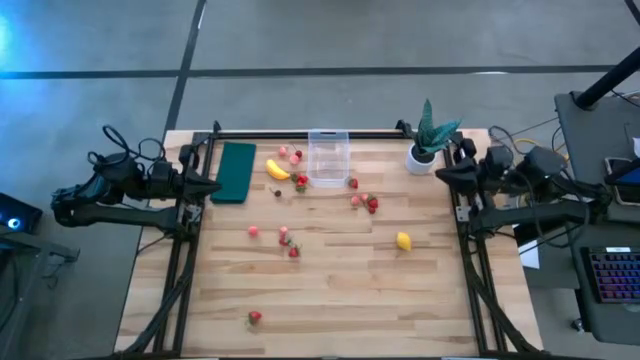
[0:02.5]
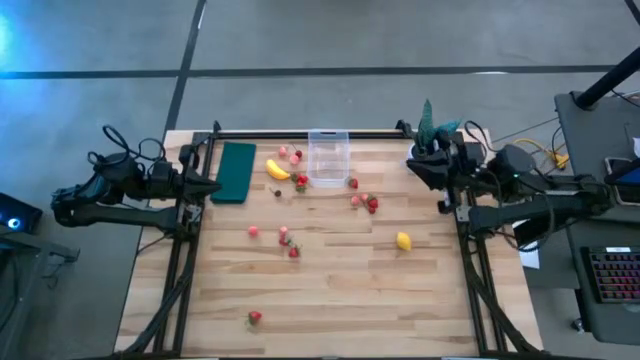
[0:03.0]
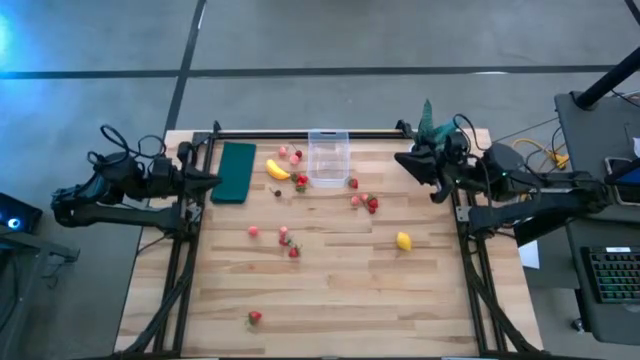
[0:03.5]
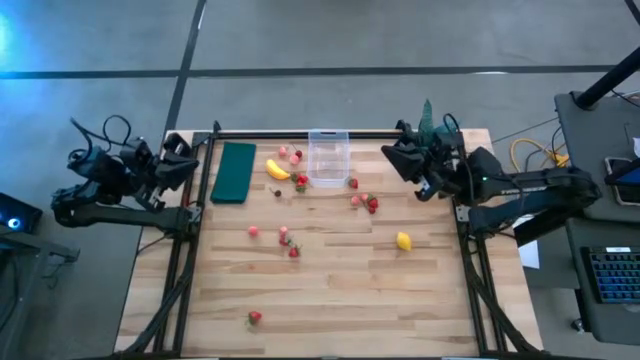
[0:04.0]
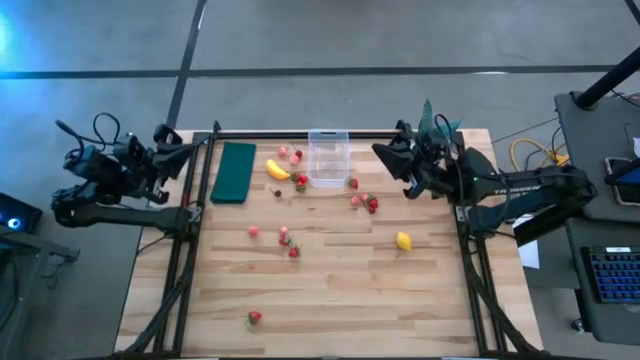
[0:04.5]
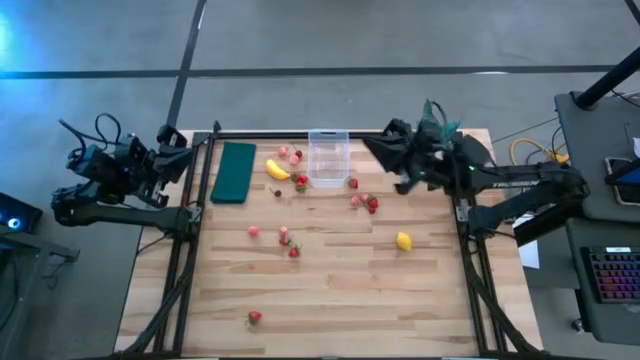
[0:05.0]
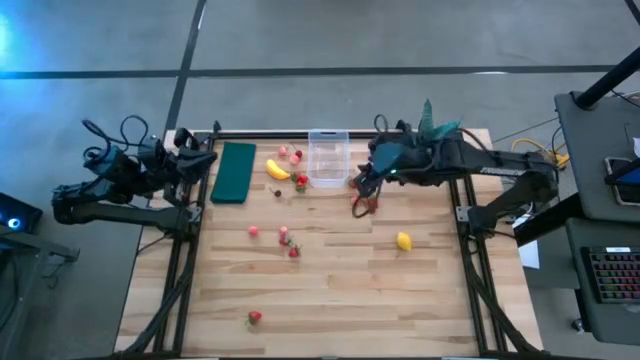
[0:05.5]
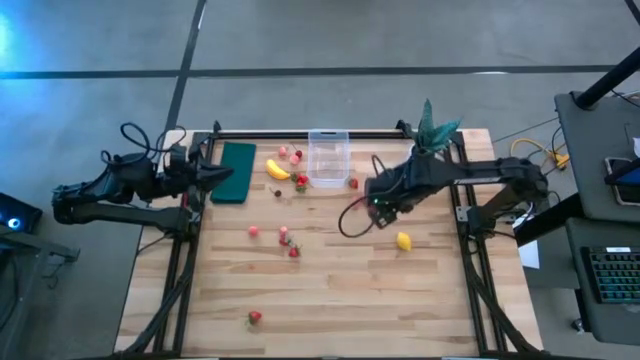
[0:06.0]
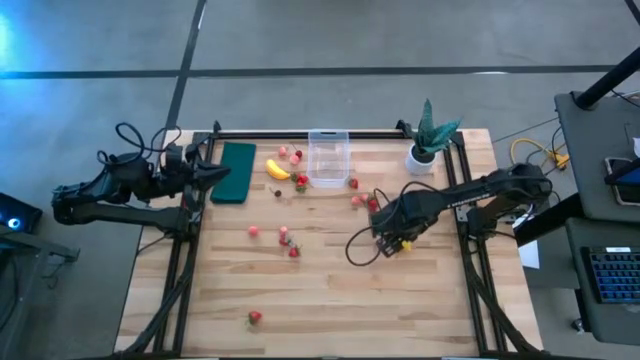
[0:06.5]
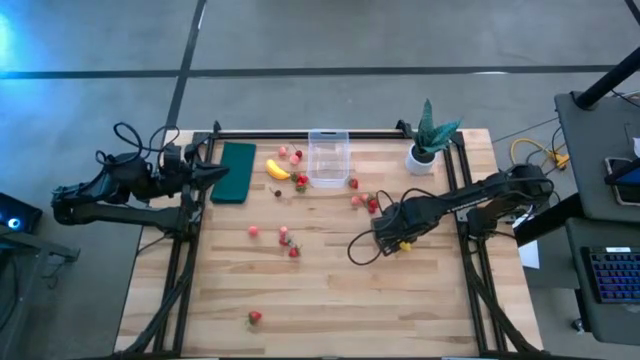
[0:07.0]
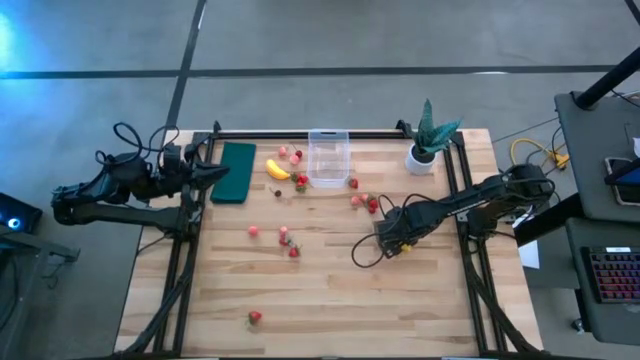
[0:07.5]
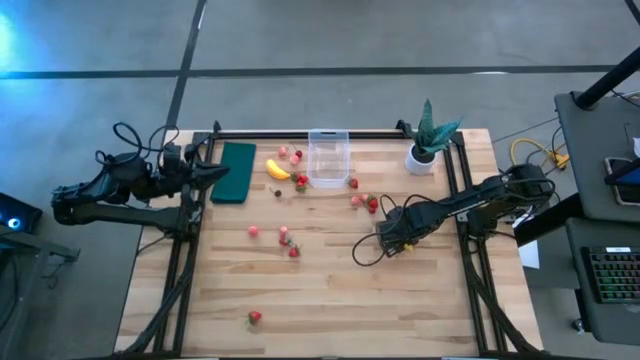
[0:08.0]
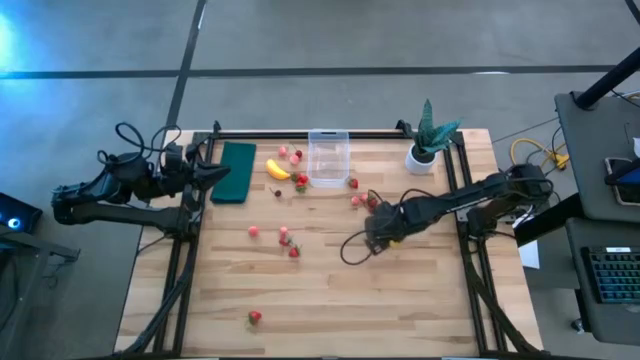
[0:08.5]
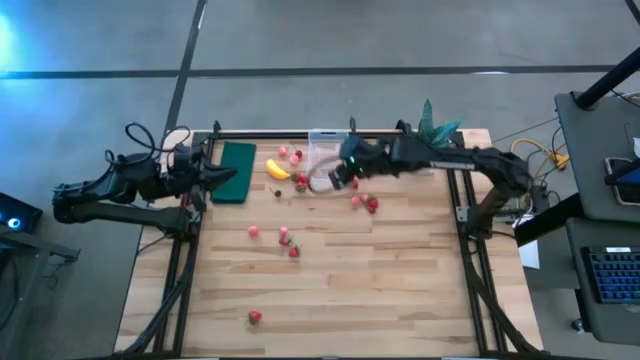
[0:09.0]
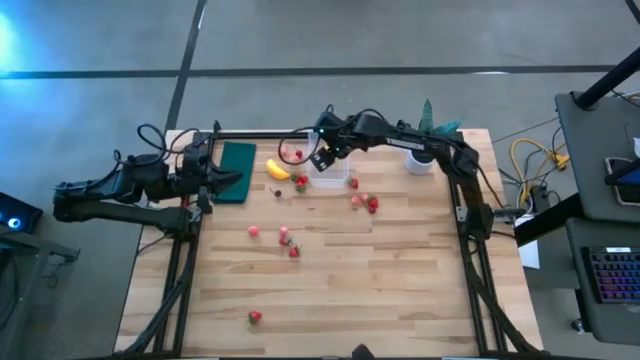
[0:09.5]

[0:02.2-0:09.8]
Task: Pick and placing Produce into tupperware
Put the yellow lemon into the transparent bin

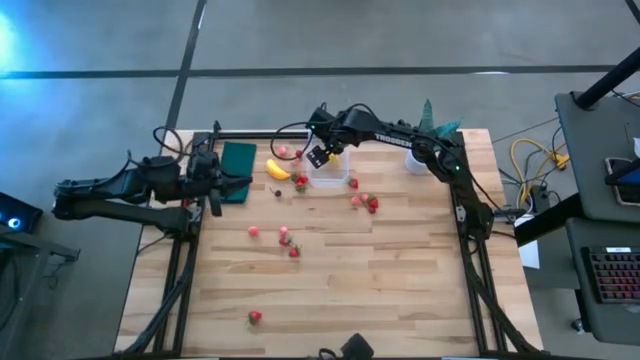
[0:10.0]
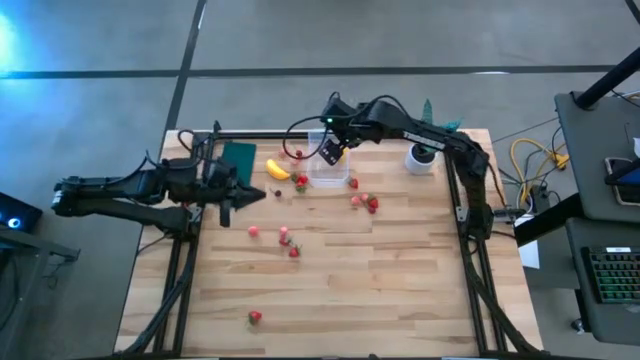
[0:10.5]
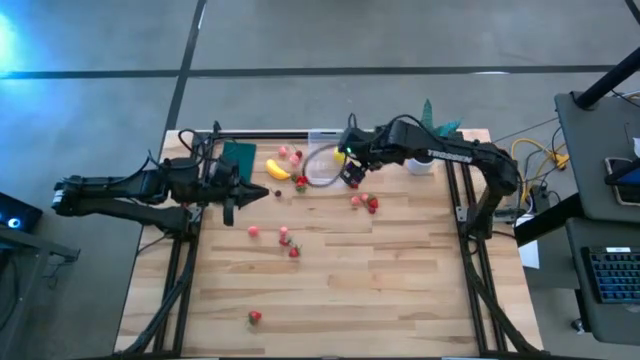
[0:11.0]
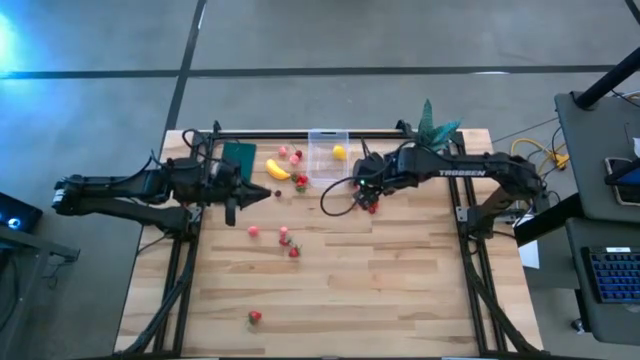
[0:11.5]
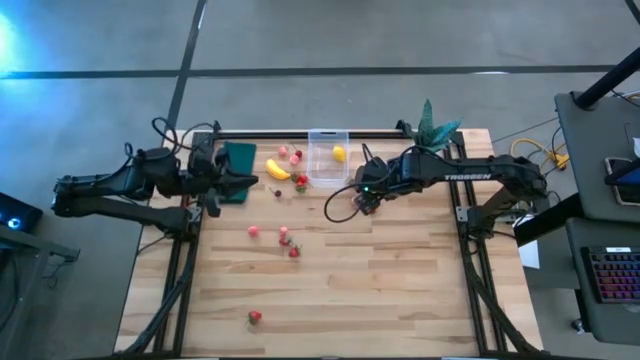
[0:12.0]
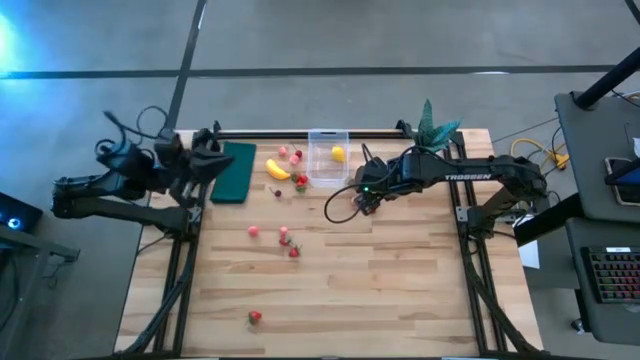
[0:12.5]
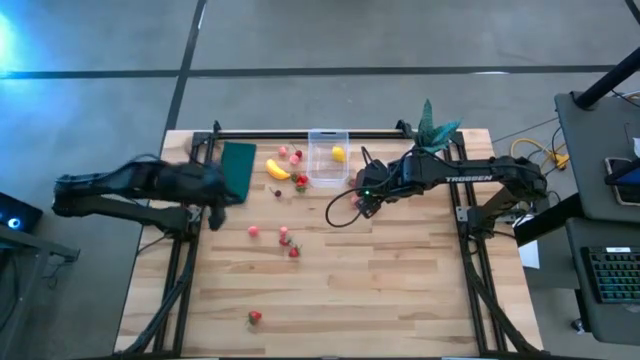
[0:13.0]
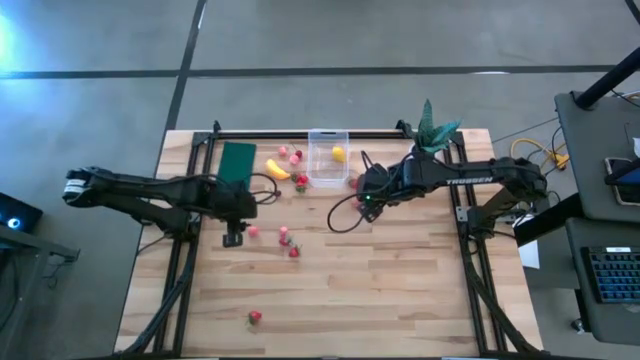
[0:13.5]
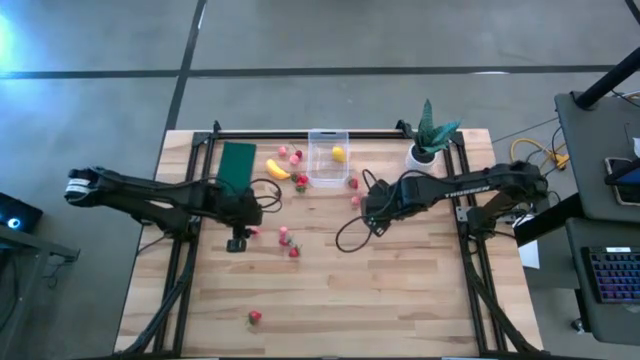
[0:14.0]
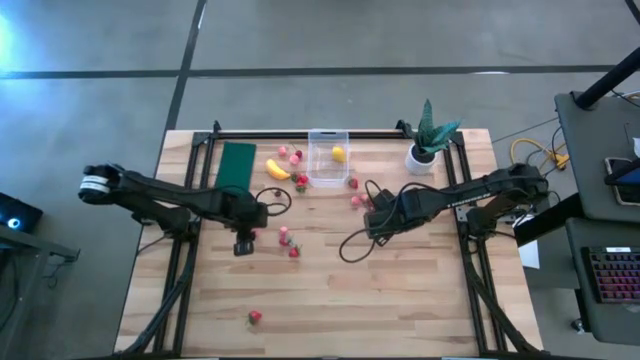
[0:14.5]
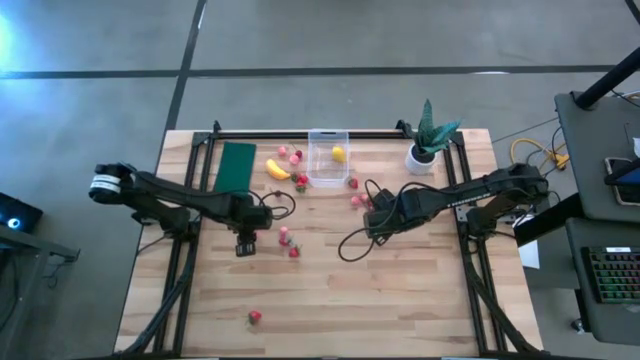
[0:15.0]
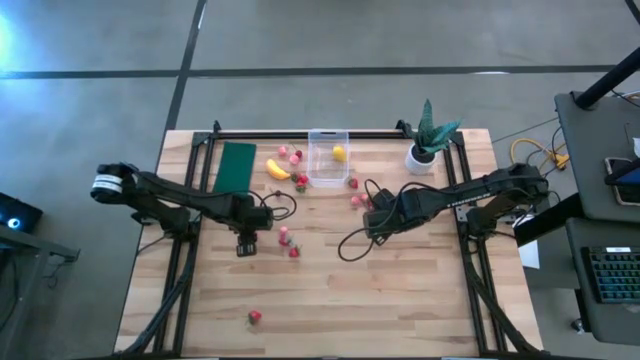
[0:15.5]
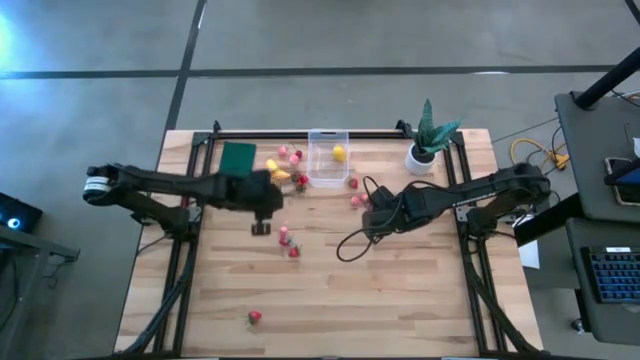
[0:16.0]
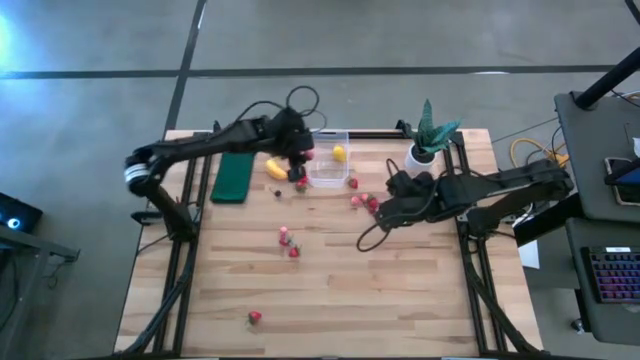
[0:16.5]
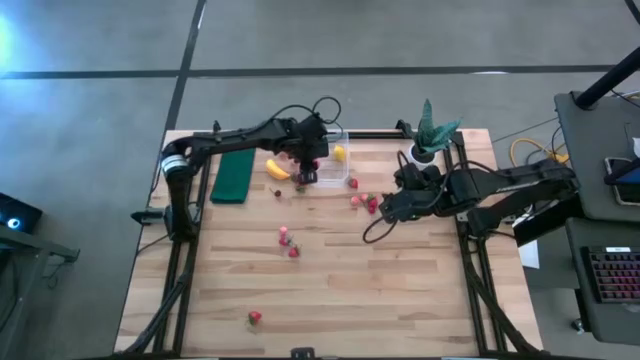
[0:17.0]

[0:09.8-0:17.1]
Put the pink peach into the transparent bin

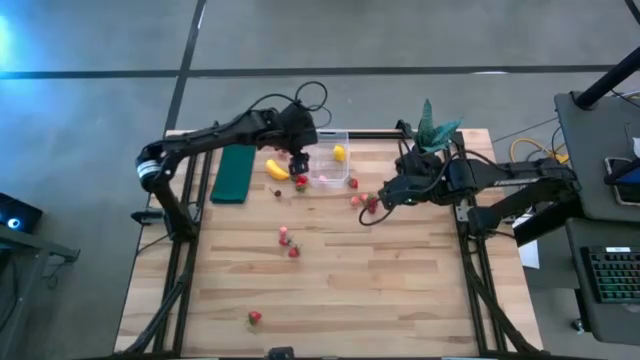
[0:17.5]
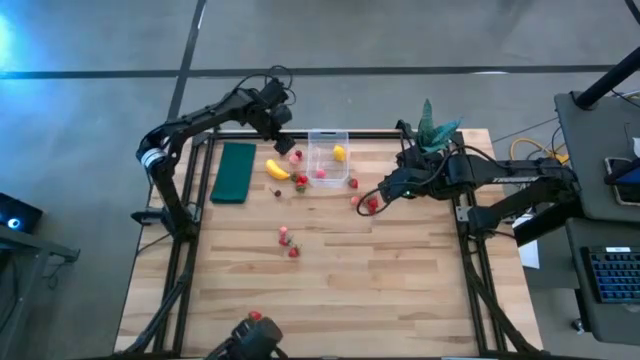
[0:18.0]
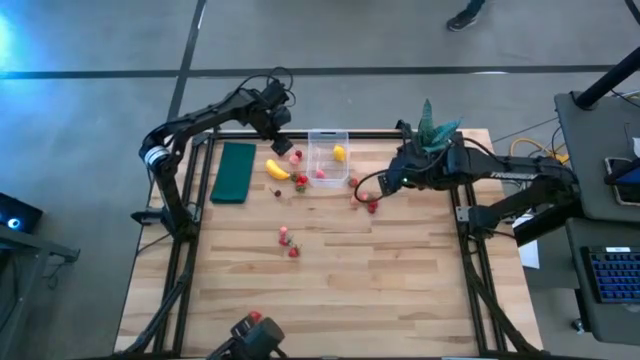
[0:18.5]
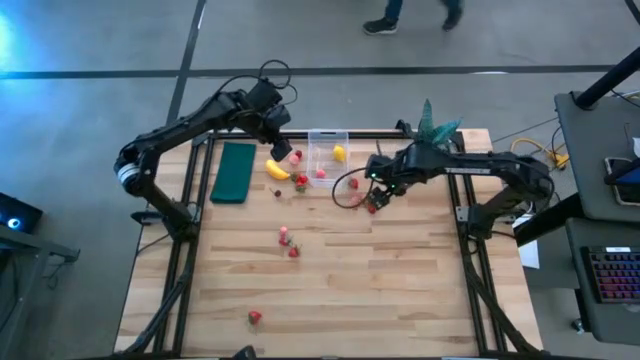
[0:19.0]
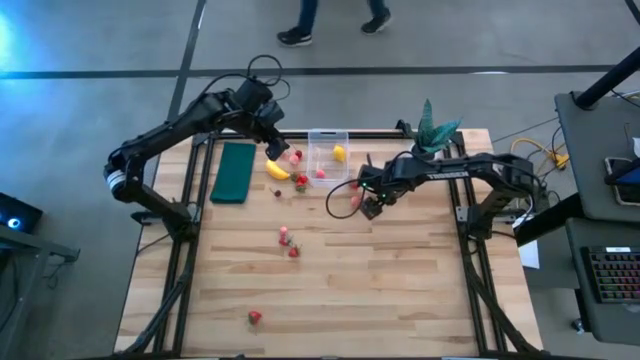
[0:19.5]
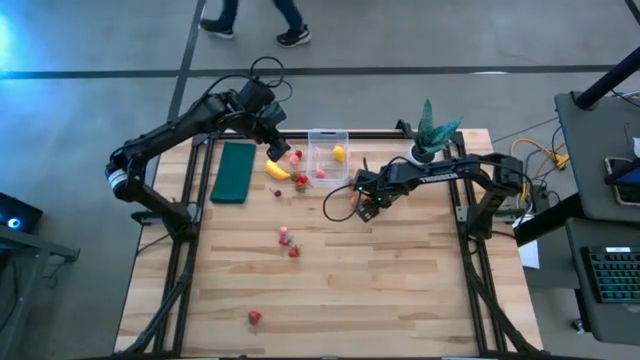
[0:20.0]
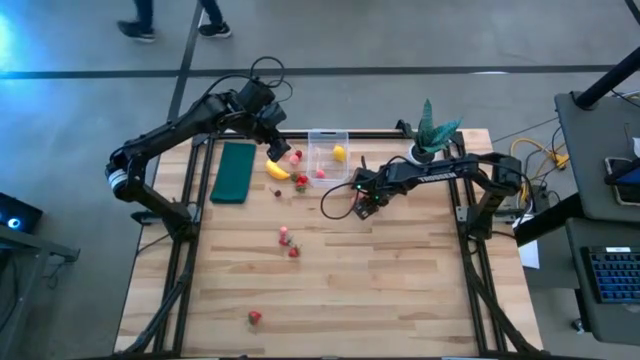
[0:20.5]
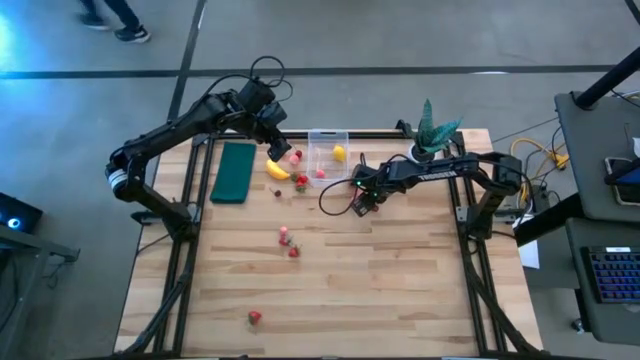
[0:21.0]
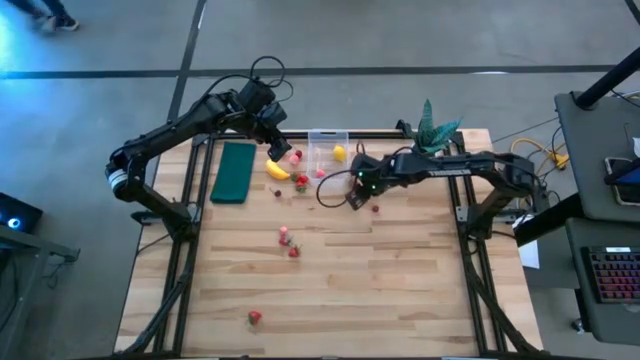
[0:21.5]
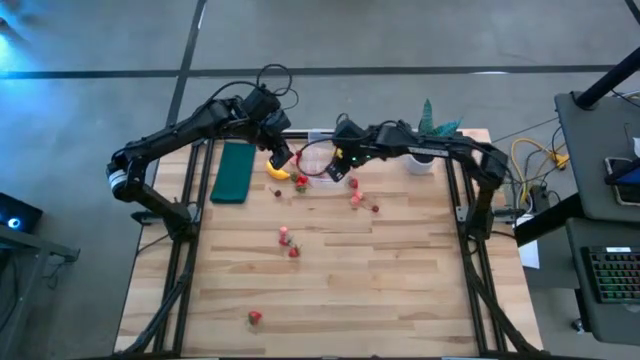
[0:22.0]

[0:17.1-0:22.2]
Put the red strawberry into the transparent bin

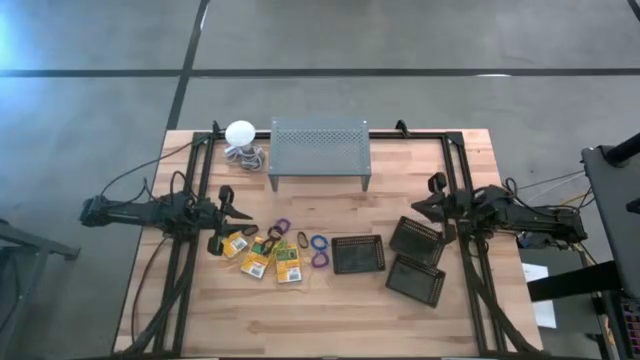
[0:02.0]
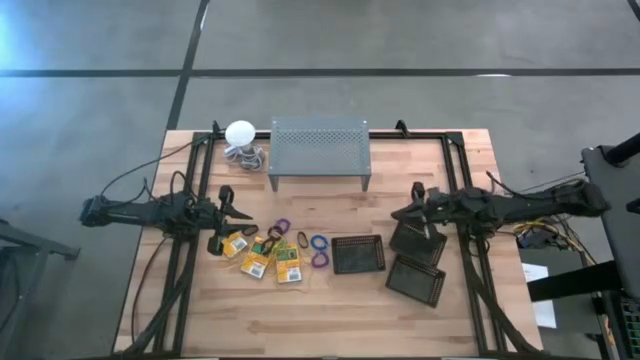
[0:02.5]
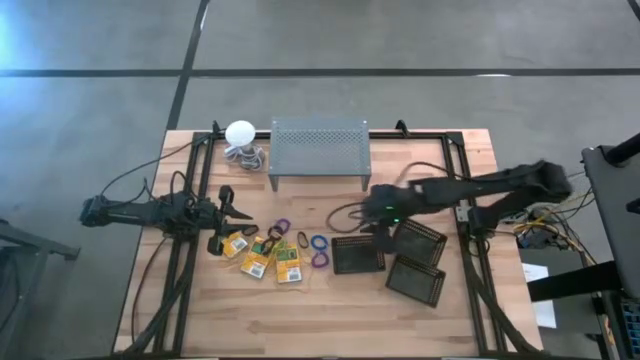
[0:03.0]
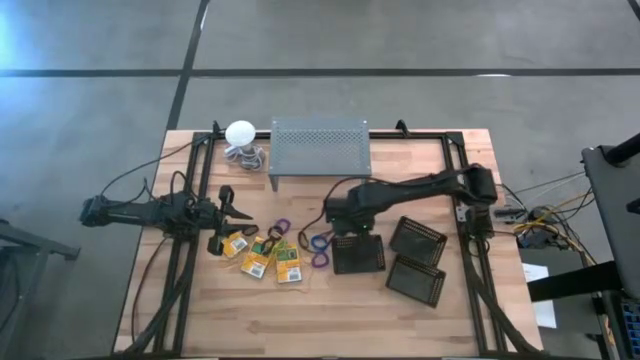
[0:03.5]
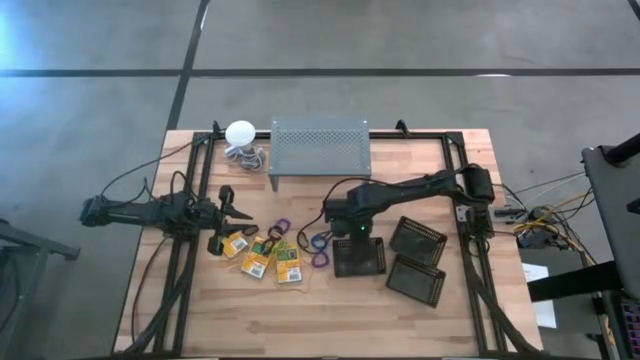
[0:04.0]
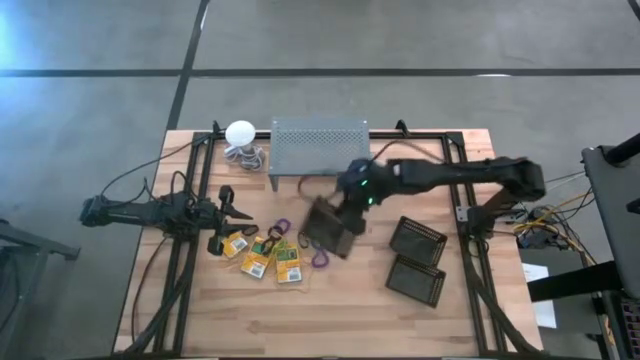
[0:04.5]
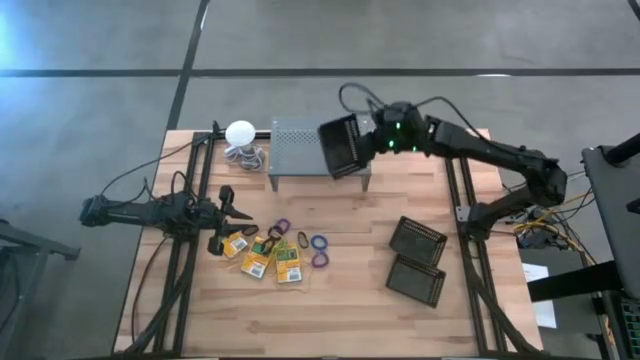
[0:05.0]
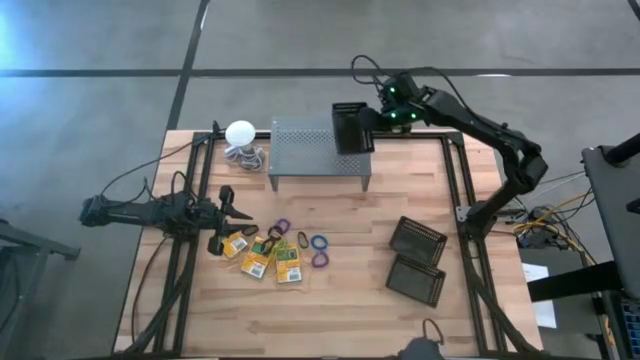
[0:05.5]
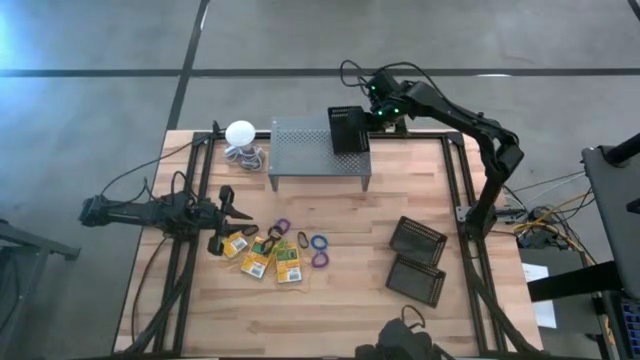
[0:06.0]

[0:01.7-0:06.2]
Task: Pick & Place Office Desk Supplies
Put the left black bin on the shelf
